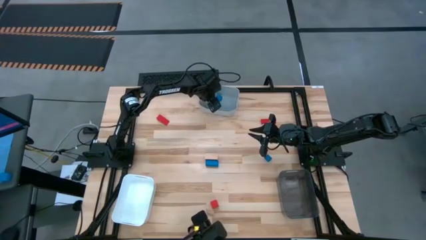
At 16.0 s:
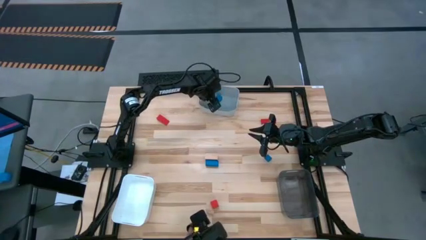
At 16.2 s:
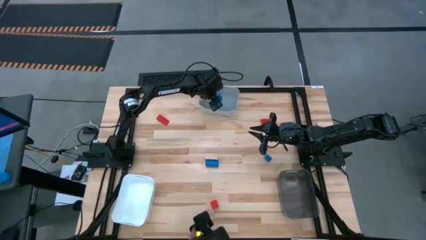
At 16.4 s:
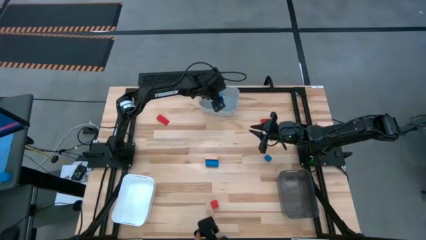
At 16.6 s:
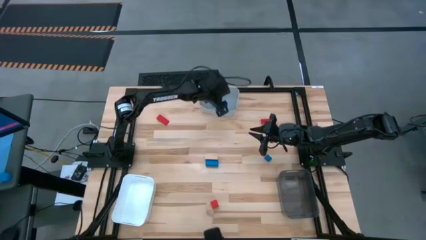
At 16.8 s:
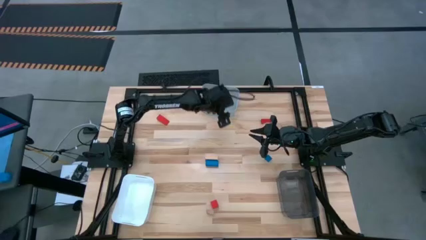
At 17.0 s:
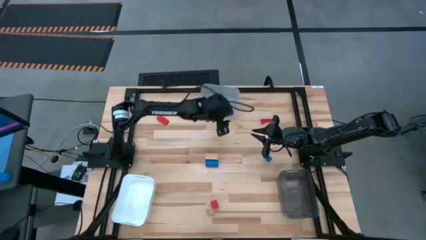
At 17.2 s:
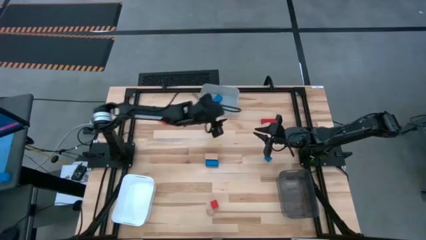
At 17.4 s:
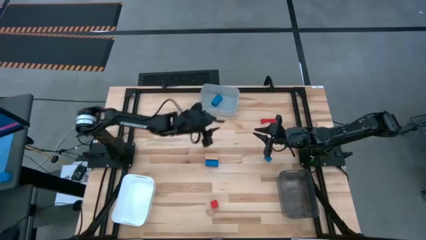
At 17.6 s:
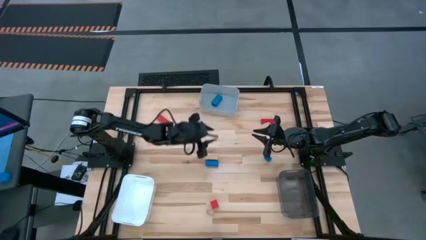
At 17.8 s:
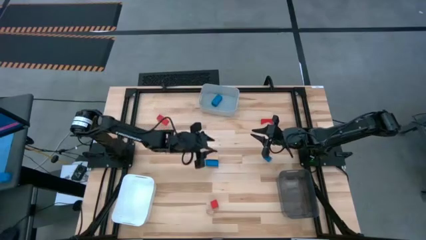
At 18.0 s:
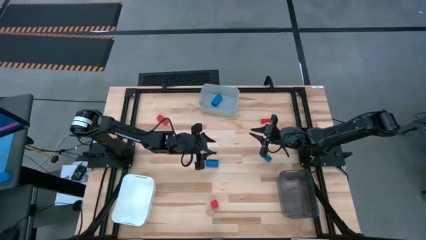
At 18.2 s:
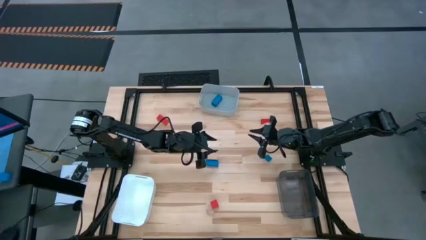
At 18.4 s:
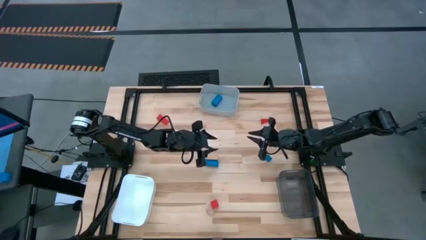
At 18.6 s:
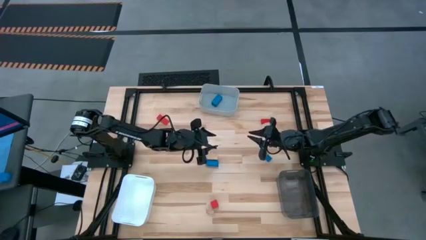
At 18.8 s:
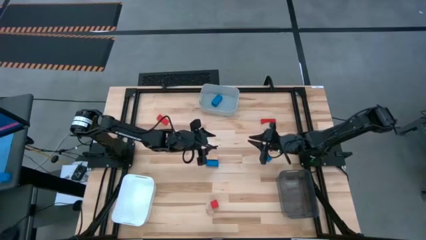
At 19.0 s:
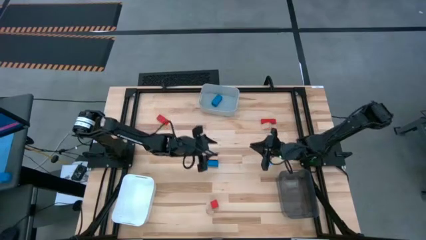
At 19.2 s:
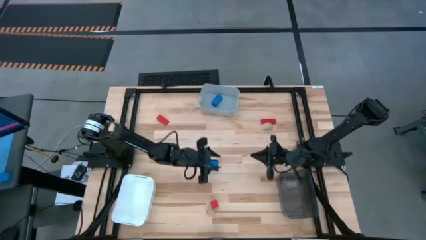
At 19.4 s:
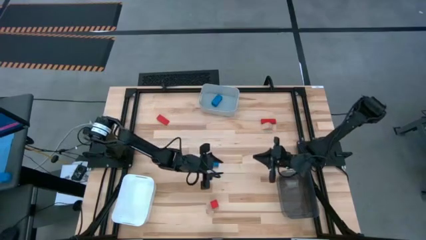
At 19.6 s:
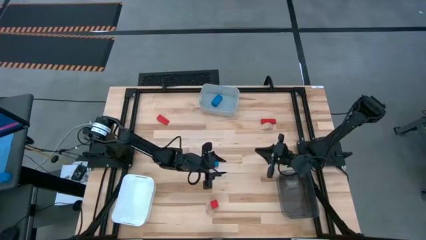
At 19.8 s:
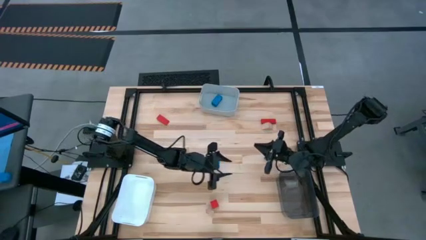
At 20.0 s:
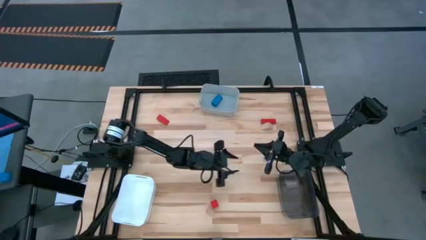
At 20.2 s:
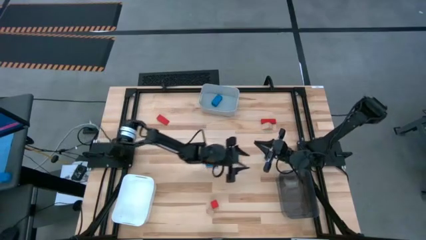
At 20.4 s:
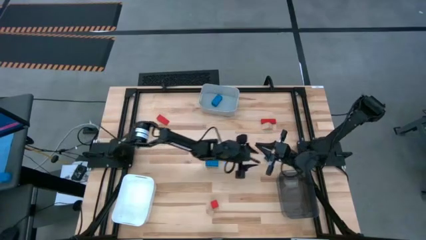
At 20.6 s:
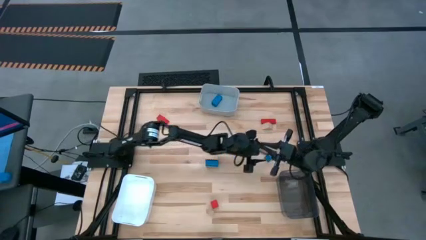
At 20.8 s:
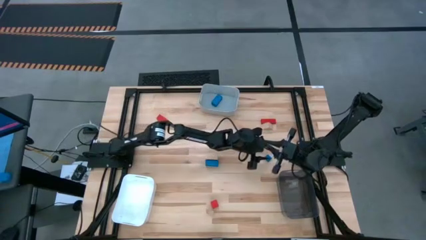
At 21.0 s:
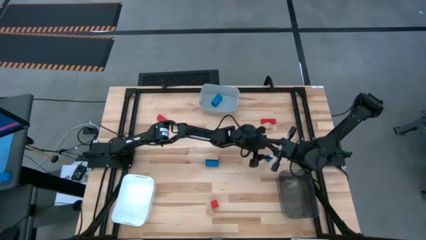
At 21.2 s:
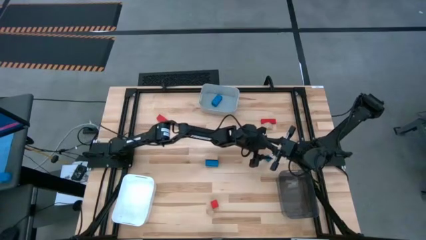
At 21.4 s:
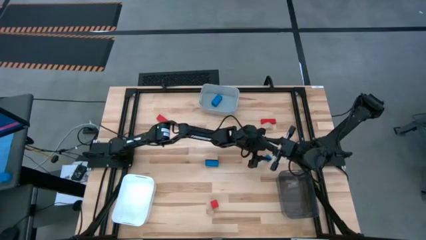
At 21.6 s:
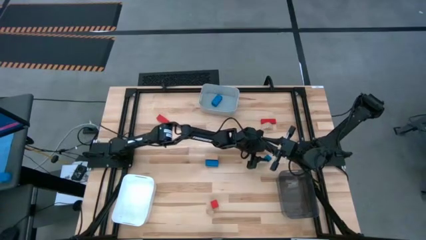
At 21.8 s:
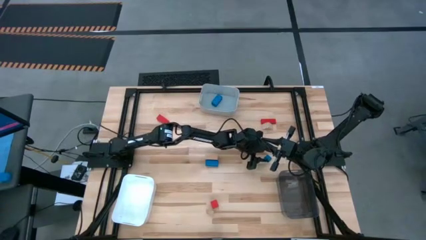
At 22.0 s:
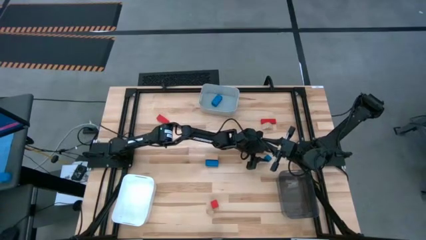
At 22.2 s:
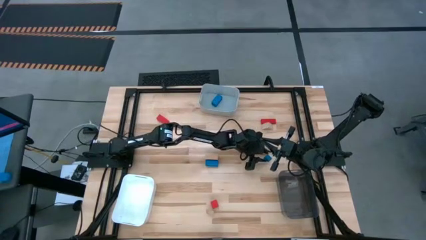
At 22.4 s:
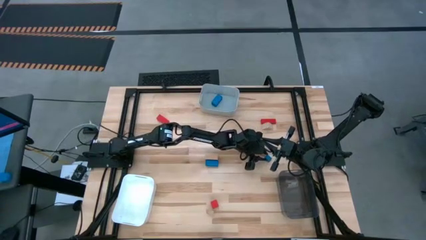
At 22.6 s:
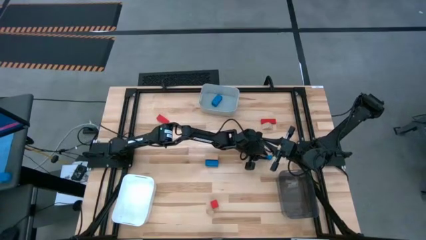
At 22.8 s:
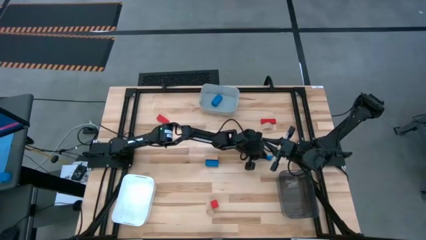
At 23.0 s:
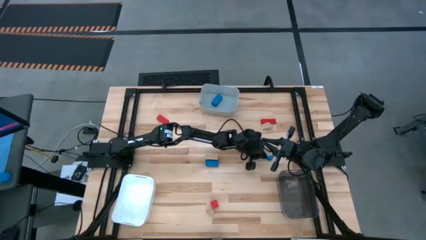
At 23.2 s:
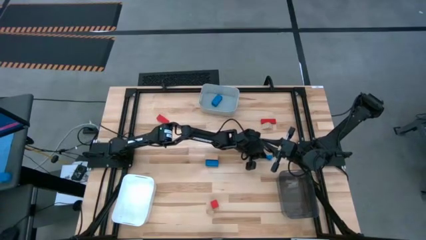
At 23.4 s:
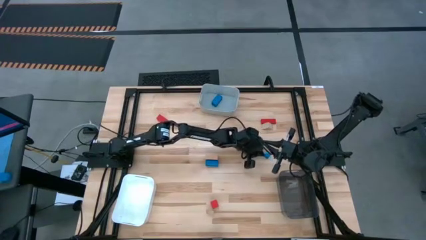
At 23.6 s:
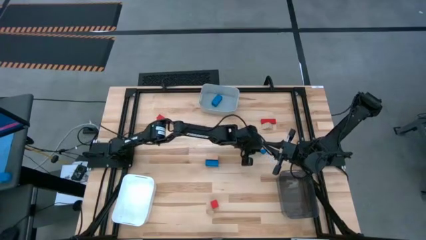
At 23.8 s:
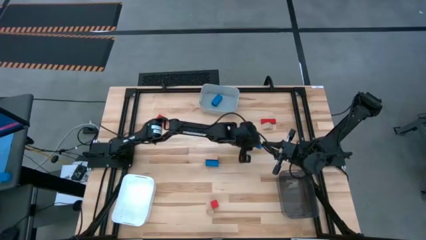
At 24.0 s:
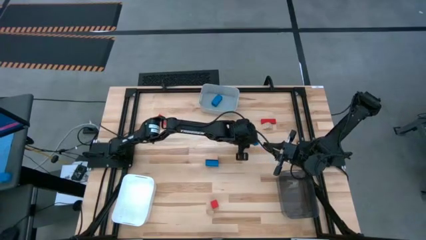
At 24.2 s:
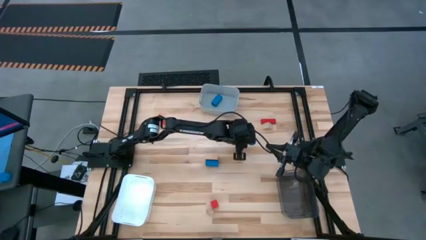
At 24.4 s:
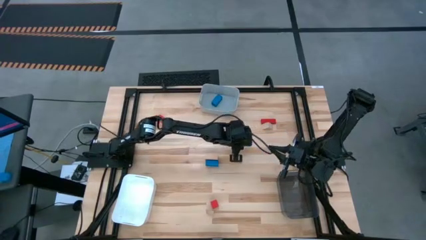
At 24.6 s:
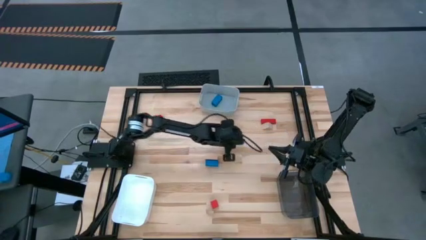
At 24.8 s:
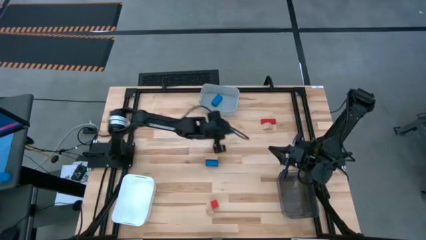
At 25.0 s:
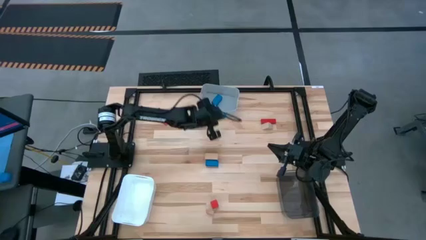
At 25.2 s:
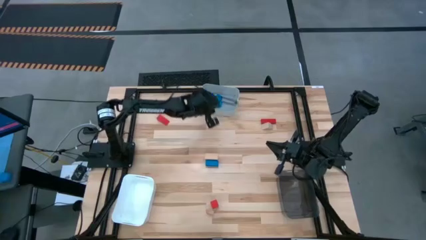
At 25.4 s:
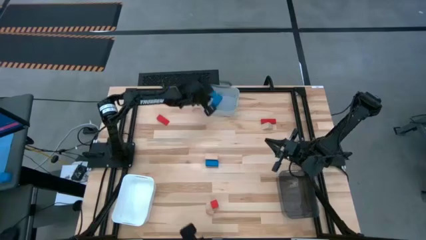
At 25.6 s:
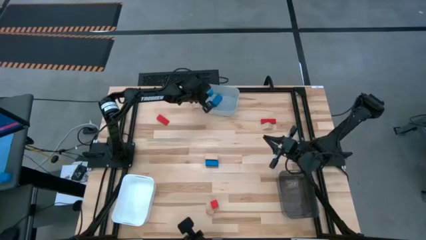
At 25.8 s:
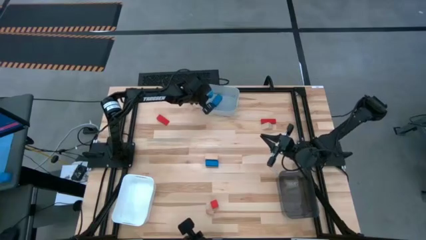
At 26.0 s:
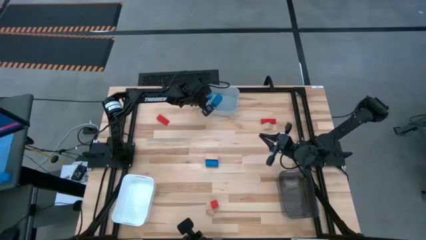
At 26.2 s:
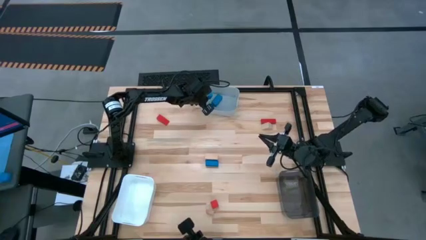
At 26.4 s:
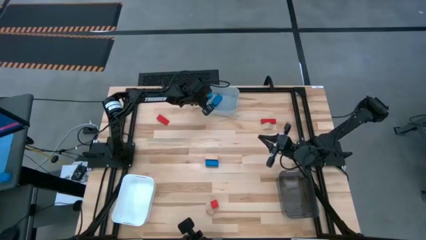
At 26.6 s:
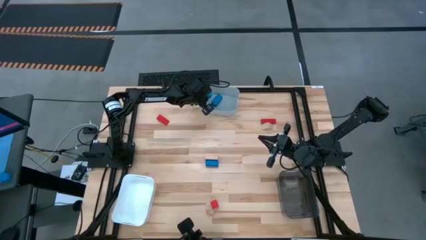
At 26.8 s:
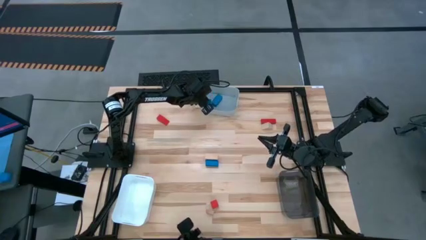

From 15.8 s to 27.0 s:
Task: Sort & place blocks by color
Put the blue triangle block into the gray bin

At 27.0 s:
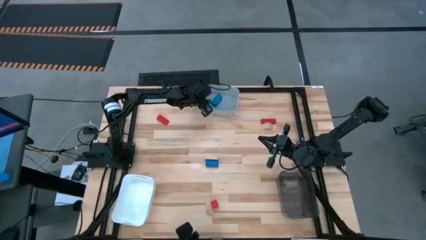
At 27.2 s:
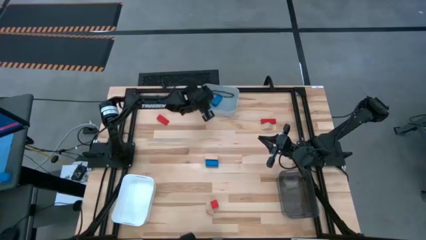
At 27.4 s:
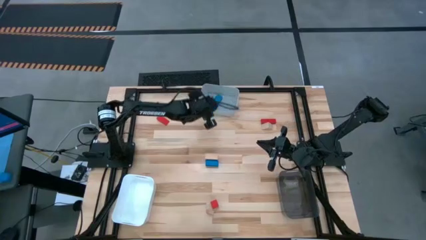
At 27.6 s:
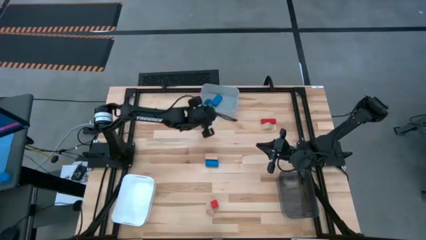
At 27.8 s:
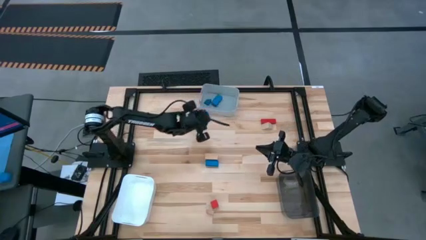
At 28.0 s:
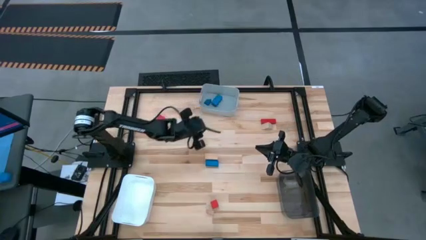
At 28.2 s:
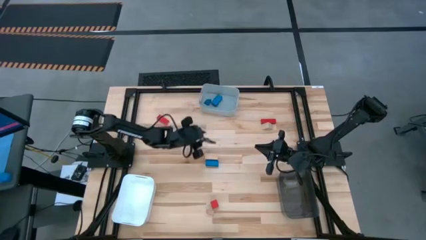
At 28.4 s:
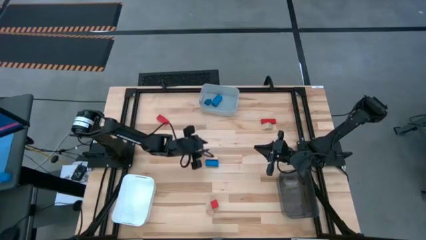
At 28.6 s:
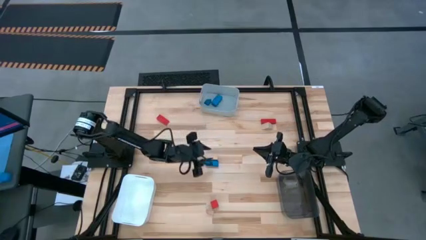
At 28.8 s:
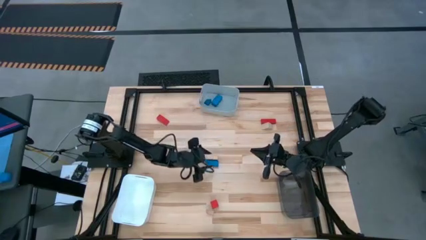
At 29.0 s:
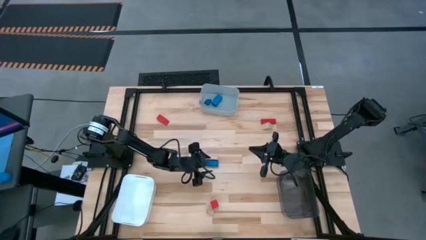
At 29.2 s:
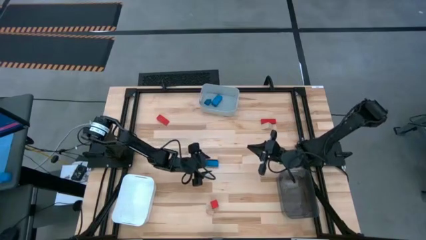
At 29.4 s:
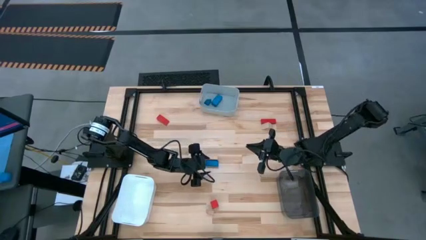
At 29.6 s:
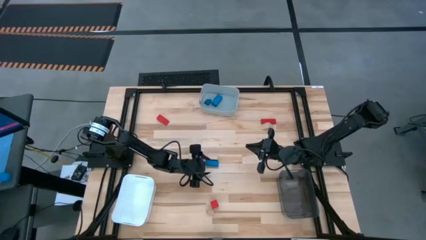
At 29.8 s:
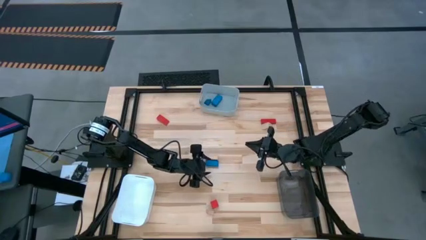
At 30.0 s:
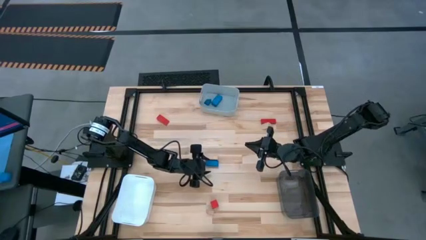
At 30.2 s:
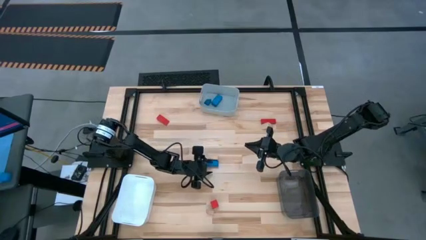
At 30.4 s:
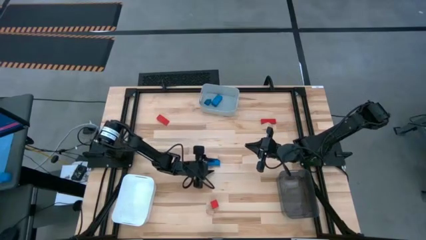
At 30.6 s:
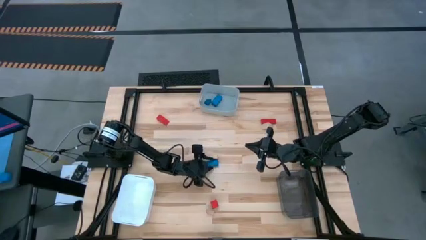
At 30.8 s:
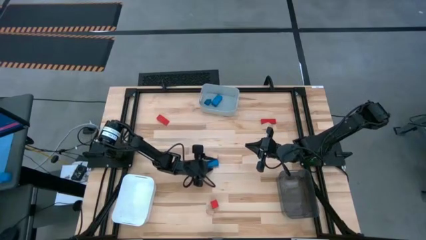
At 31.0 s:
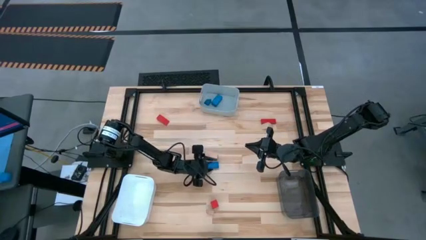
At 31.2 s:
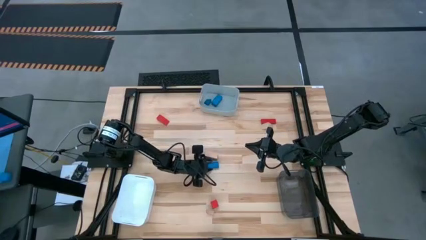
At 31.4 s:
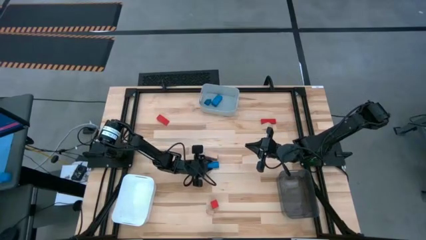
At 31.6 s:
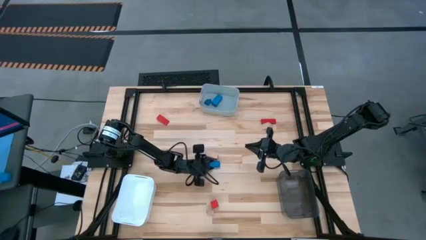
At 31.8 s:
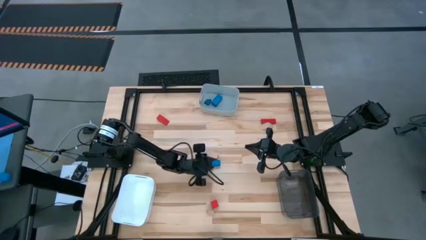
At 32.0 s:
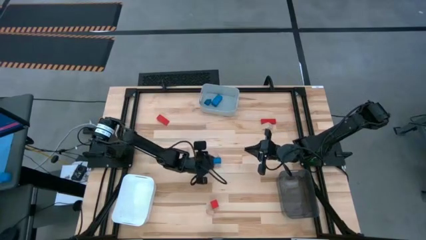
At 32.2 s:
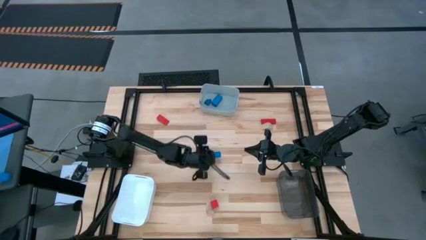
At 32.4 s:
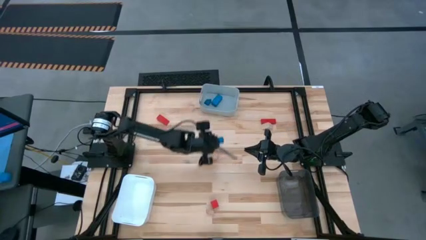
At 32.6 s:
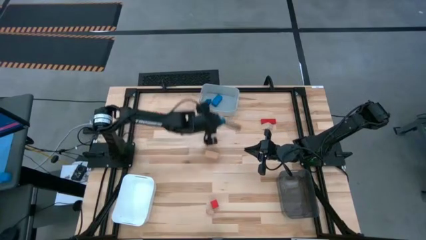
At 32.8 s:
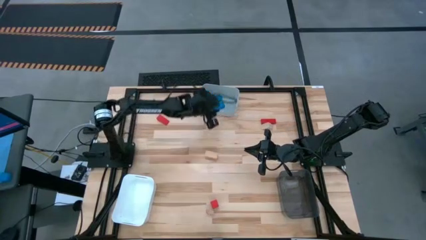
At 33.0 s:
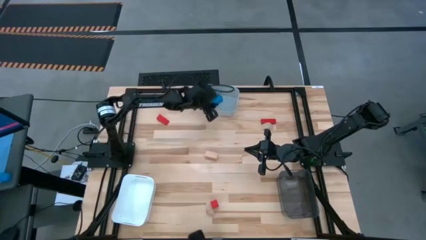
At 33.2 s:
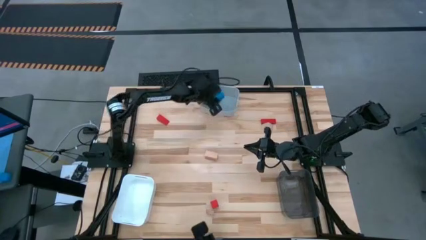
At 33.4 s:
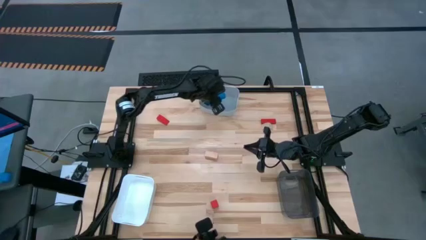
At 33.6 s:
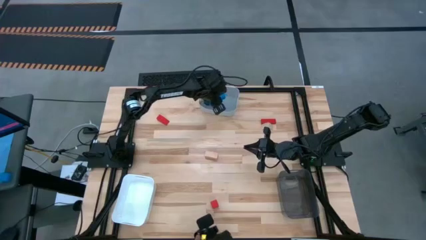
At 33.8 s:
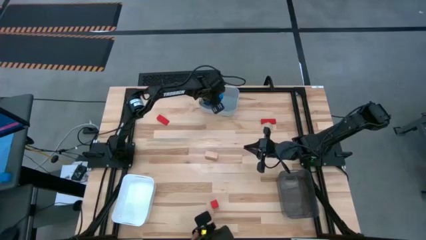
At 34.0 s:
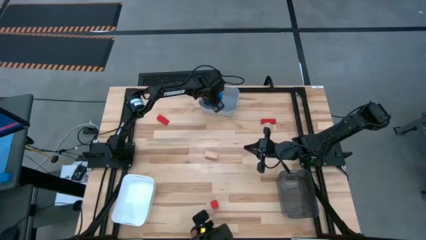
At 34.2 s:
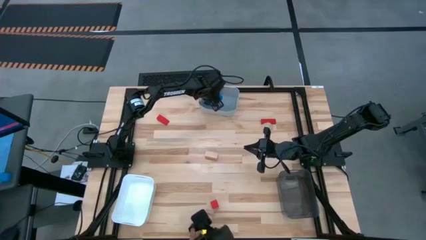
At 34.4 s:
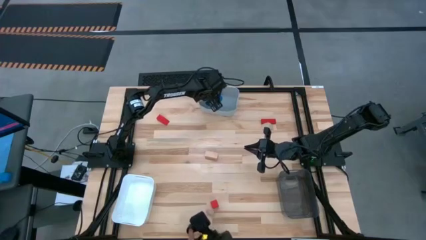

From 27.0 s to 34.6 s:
Put the blue cylinder block into the gray bin
